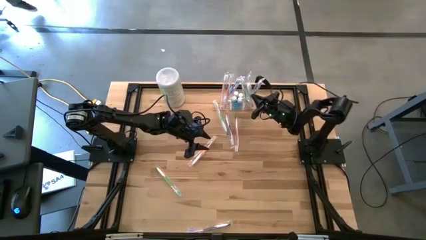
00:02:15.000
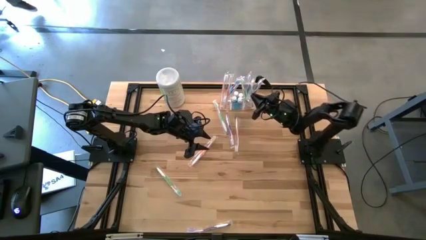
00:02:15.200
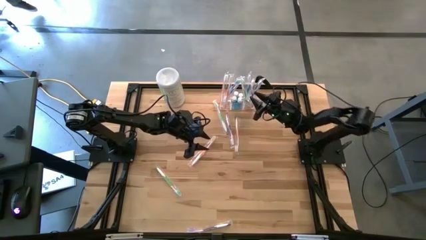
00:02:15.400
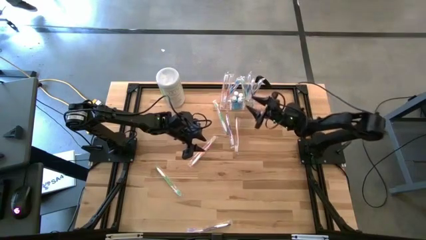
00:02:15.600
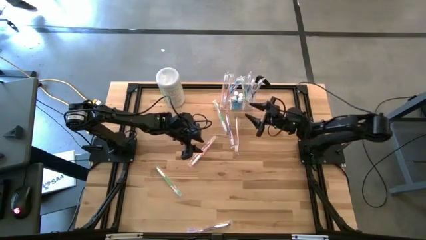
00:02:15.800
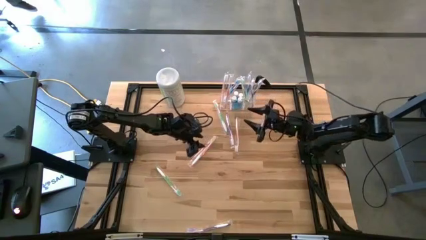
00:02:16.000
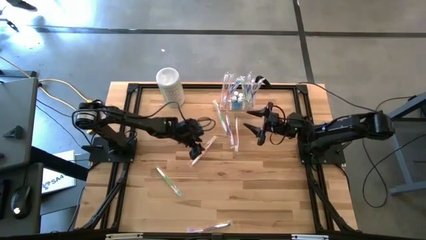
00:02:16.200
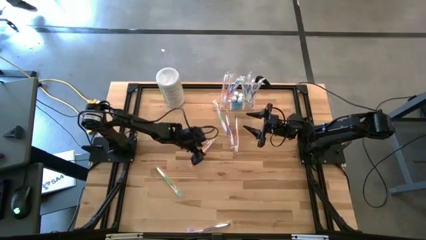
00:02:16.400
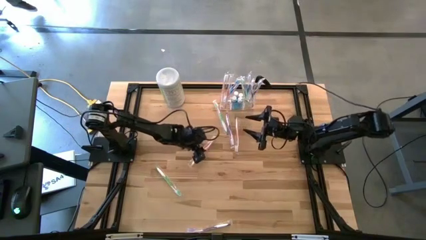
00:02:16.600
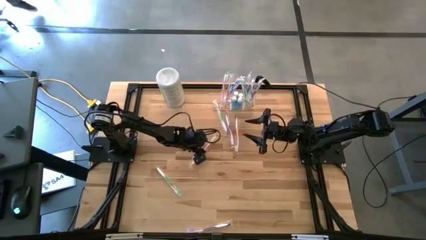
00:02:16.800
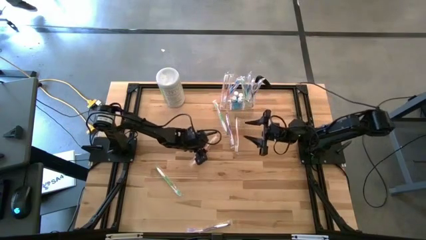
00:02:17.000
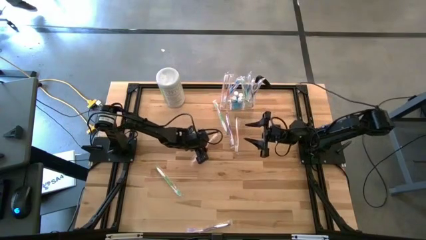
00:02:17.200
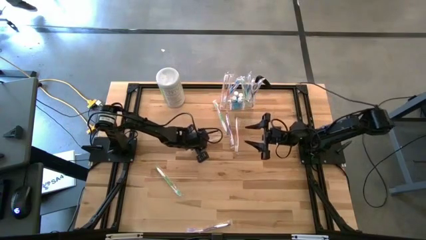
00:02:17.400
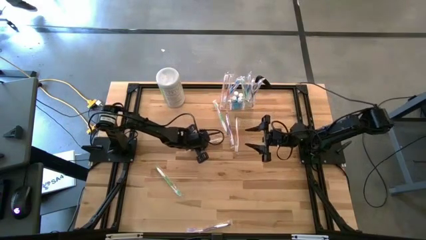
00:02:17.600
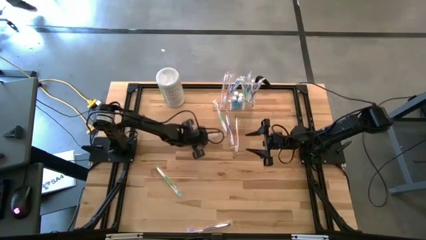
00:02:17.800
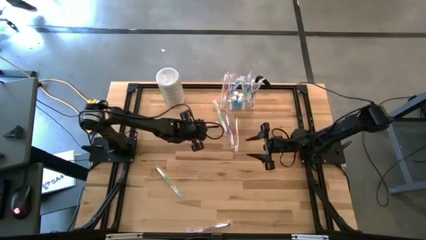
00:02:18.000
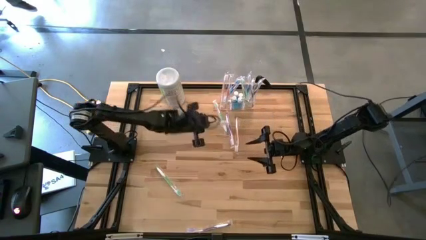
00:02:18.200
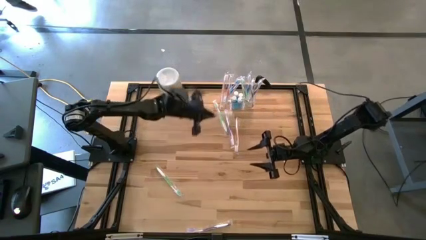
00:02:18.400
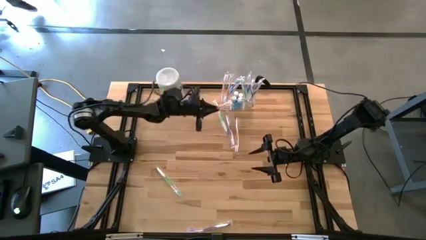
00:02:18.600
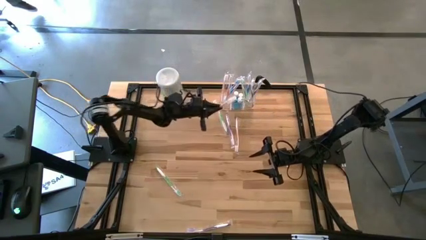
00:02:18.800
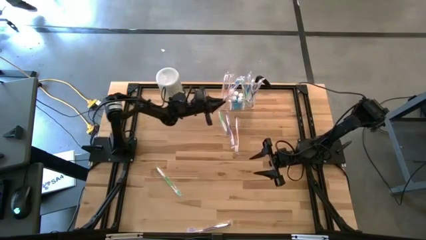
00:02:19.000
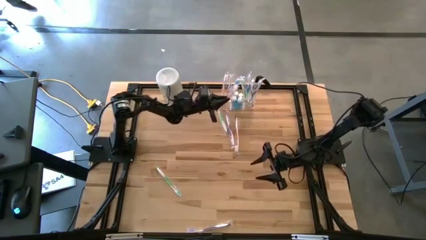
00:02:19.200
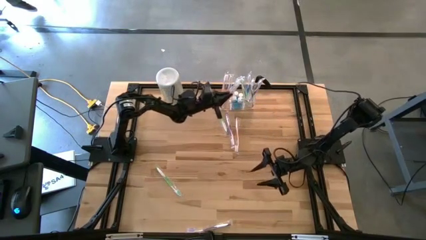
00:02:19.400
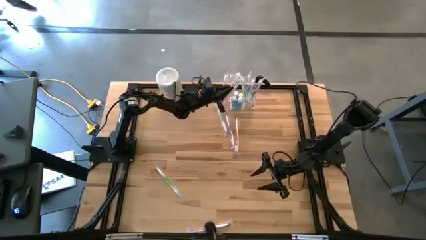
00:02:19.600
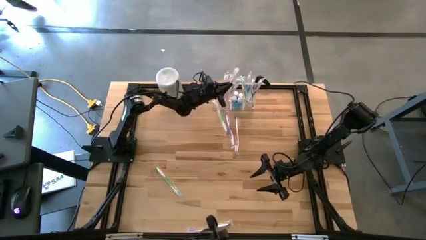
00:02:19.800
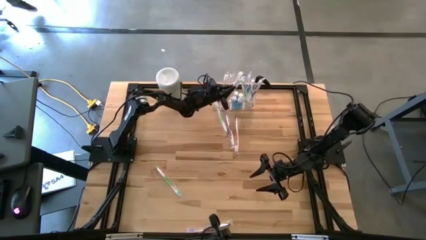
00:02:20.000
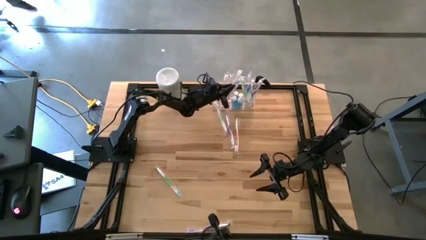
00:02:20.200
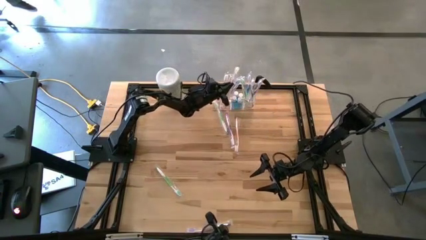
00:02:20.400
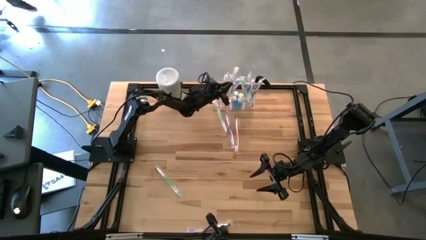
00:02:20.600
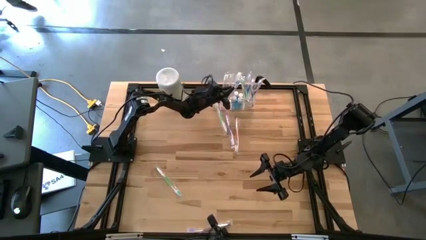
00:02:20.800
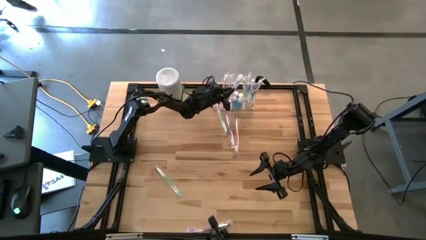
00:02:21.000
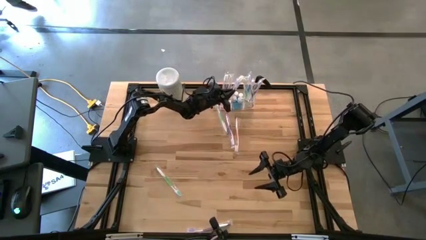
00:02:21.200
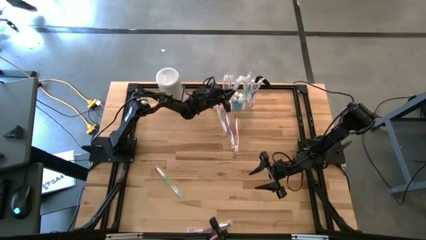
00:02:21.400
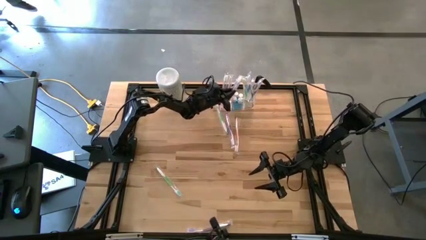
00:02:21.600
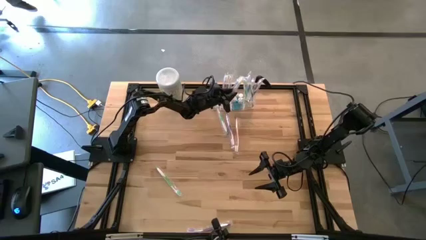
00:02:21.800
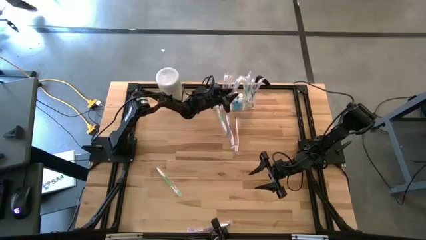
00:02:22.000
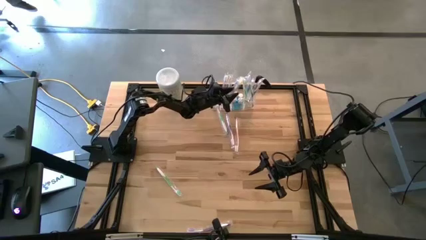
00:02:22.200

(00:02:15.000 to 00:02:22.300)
Task: Pick & Place toothbrushing station
Put the orange toothbrush into the transparent organizer

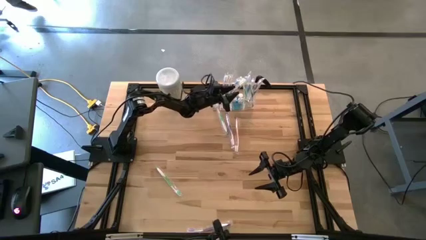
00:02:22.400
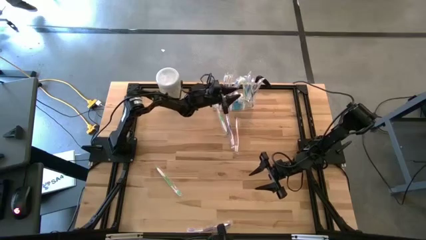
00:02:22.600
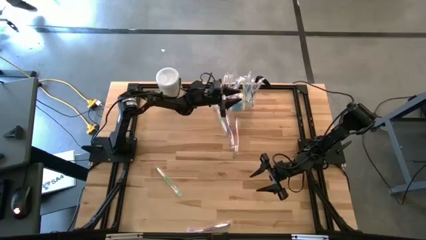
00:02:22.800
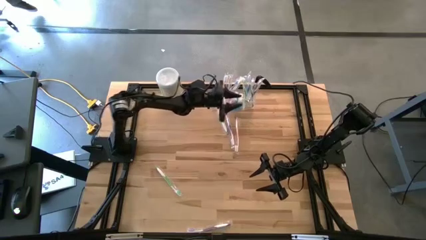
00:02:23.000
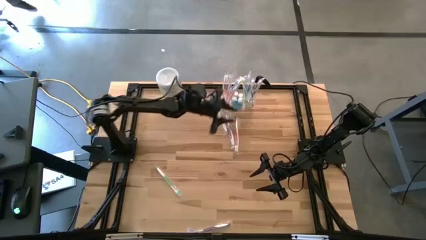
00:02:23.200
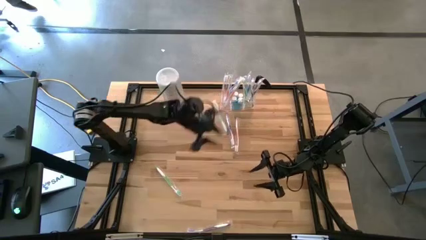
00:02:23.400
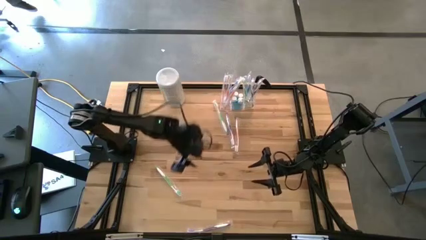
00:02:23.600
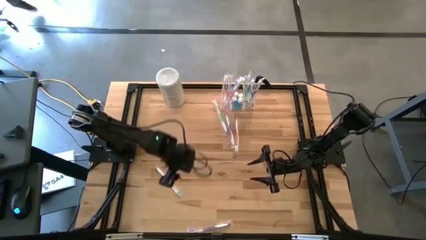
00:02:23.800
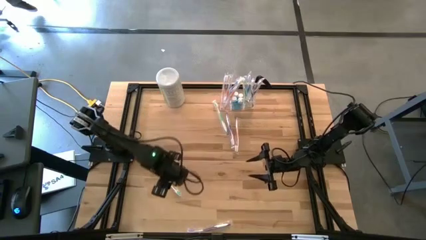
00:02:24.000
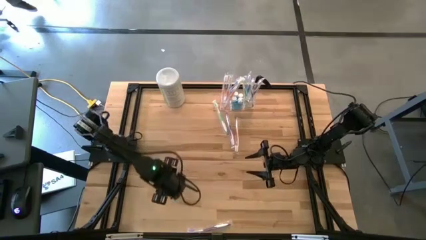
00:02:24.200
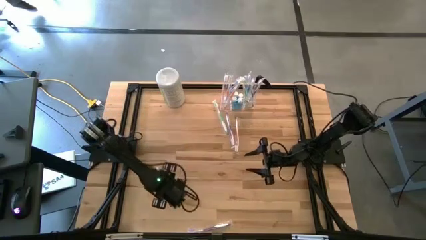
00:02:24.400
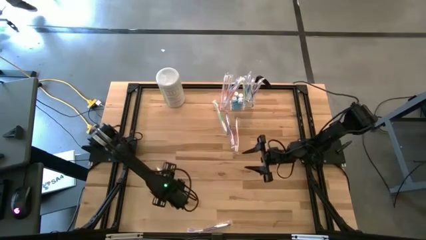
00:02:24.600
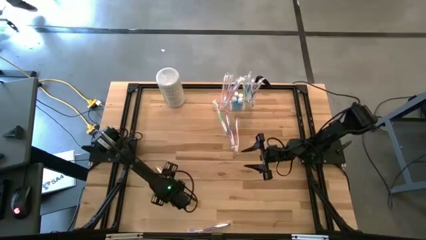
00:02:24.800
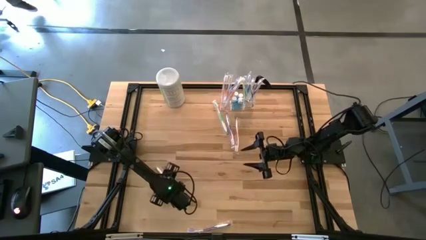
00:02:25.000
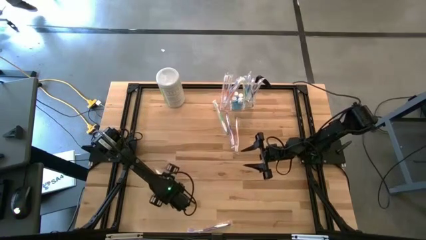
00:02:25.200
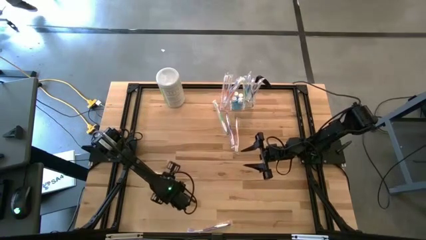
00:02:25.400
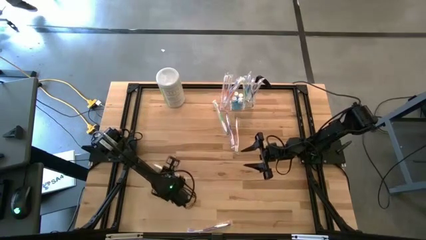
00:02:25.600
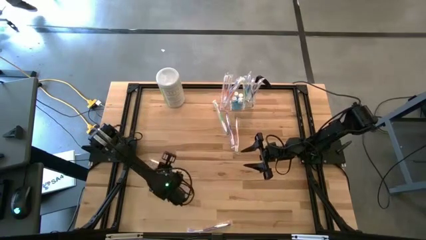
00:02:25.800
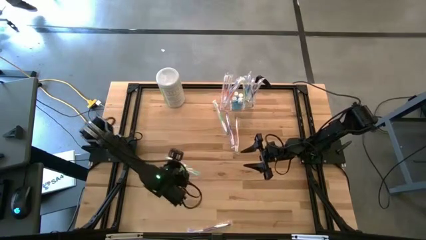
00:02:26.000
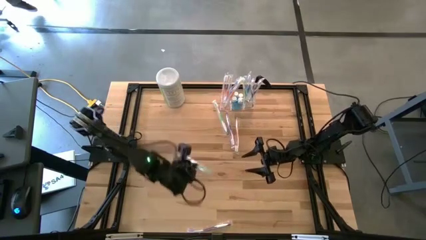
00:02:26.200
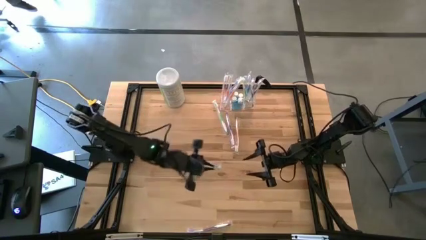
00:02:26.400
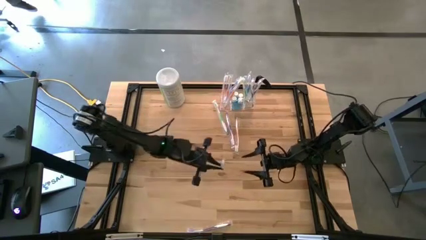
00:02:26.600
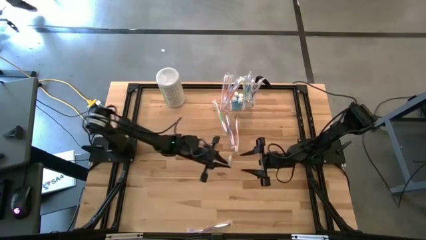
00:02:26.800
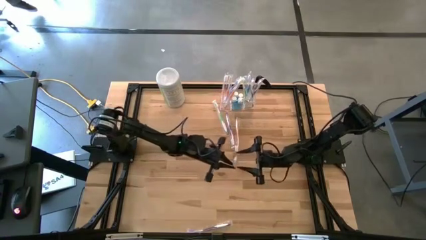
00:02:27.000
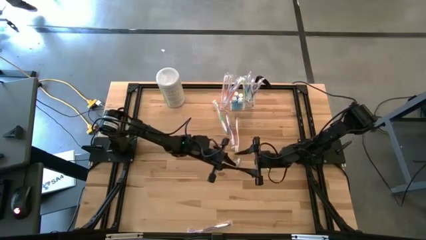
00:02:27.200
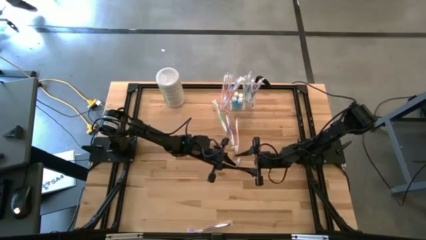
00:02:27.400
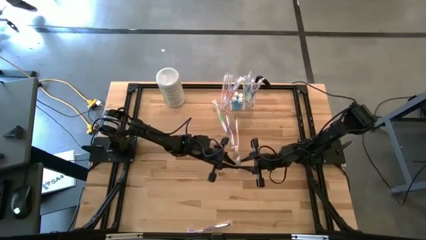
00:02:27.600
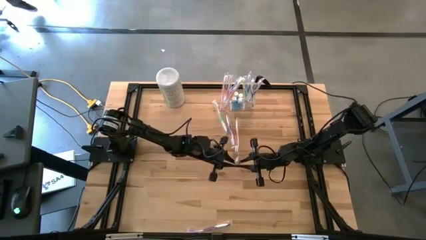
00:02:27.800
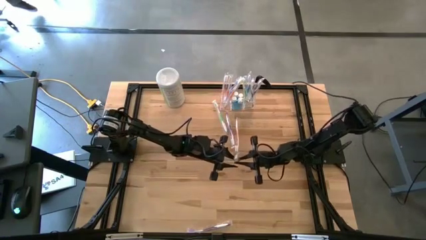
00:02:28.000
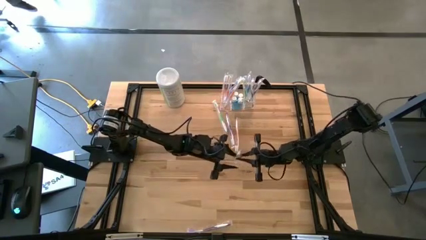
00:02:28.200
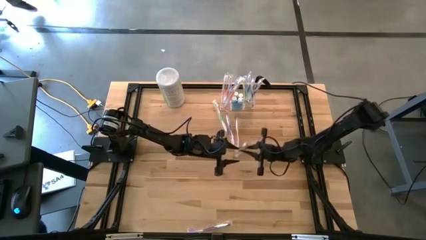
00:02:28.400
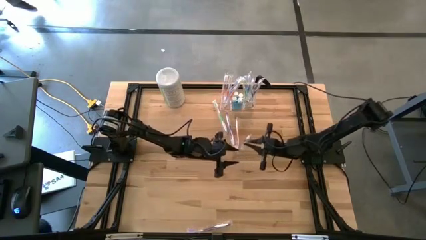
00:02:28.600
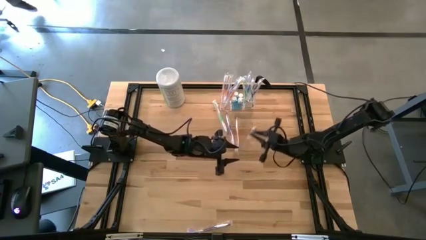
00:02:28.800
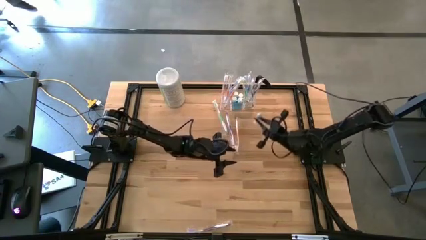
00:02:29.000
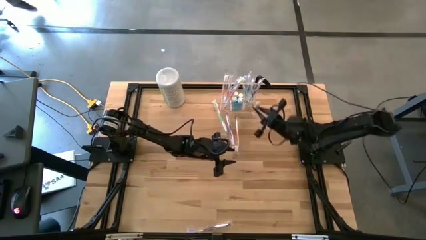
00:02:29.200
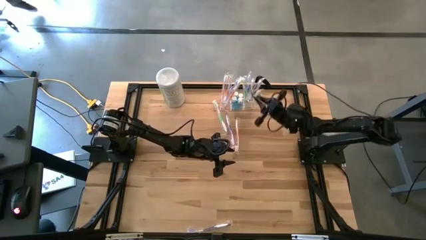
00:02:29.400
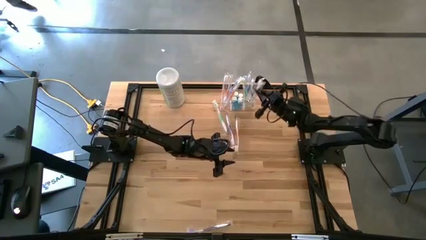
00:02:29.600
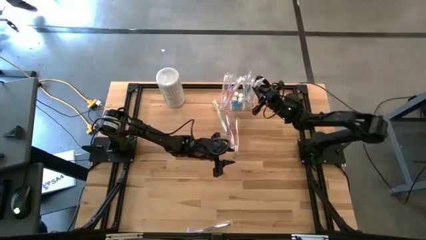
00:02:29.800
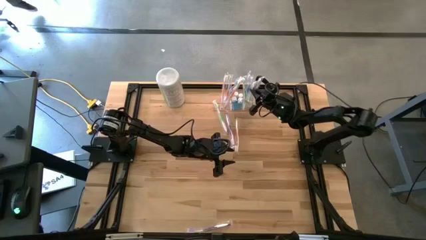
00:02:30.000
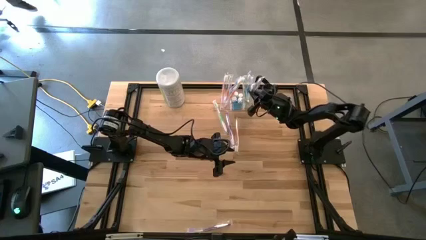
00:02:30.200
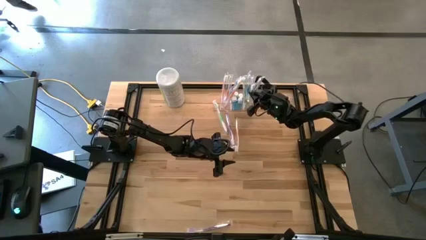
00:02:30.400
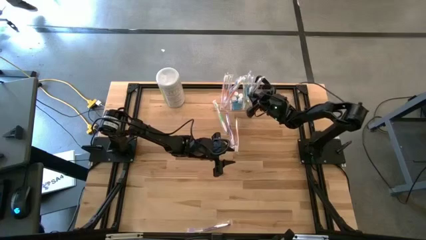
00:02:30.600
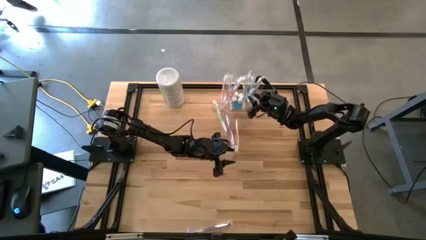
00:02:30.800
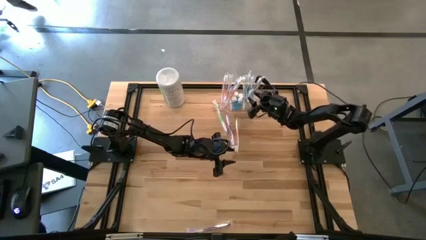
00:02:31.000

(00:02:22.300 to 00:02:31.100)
Put the green toothbrush into the transparent organizer

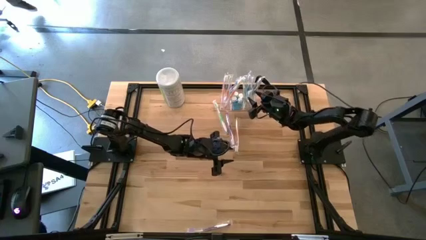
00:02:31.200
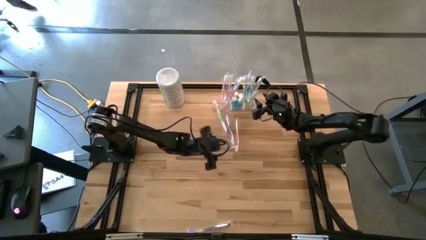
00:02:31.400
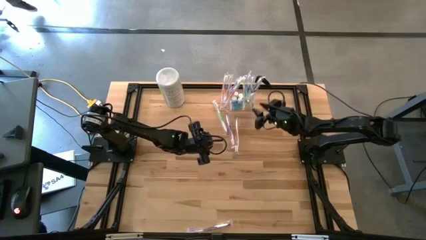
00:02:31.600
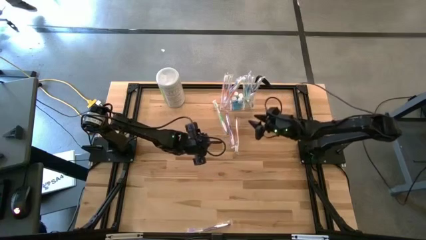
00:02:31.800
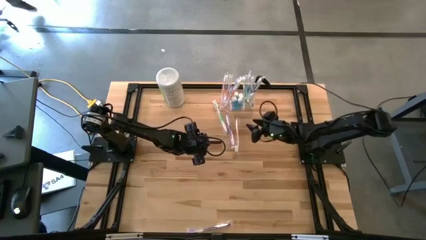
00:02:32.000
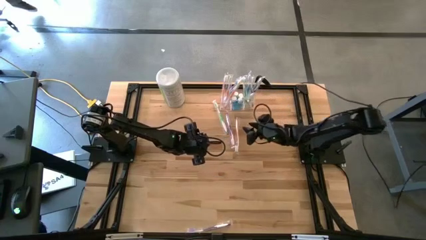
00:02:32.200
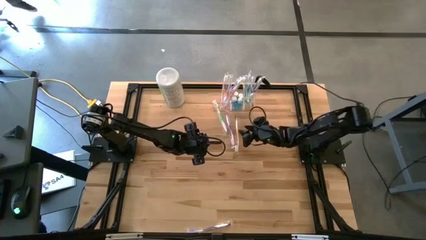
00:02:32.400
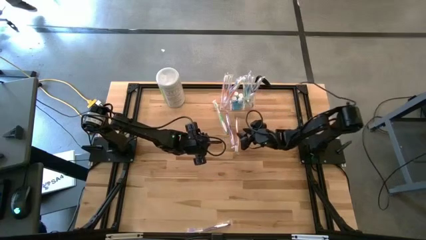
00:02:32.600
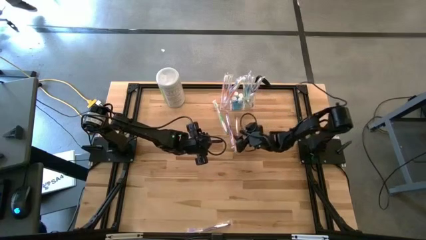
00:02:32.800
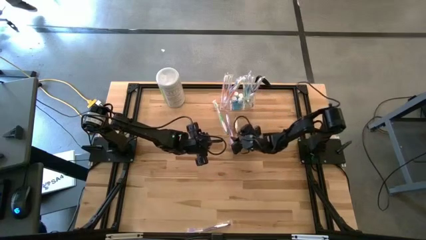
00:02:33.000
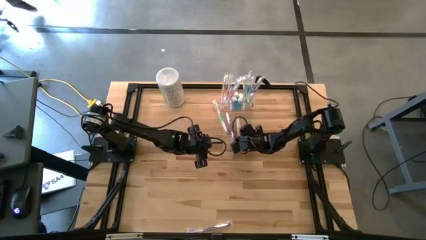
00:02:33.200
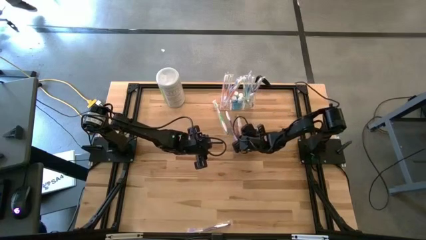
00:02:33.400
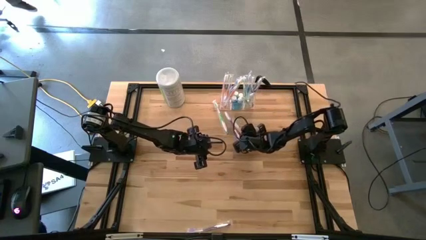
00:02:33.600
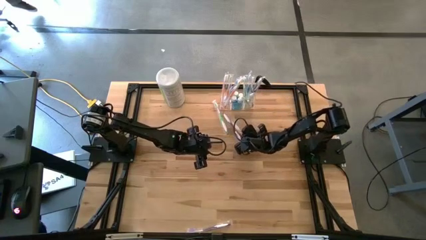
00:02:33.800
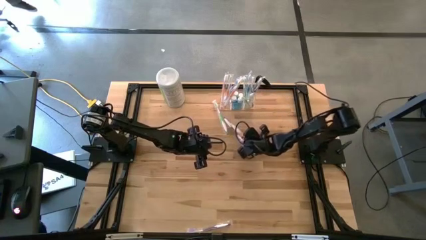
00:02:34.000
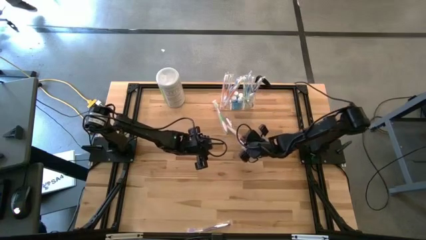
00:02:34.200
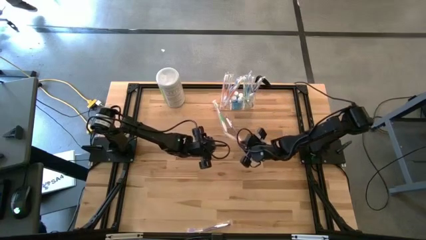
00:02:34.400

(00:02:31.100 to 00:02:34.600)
Put the orange toothbrush into the transparent organizer
